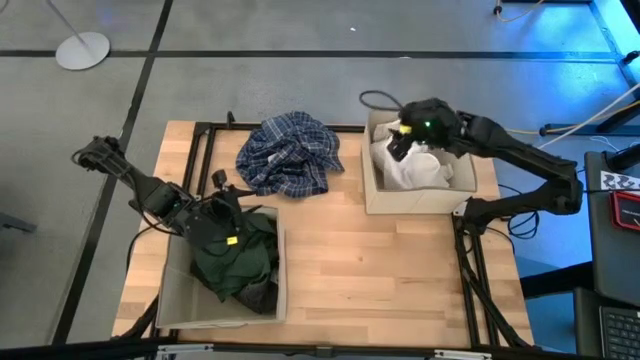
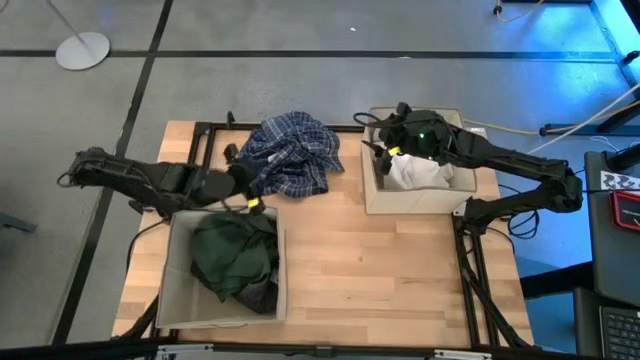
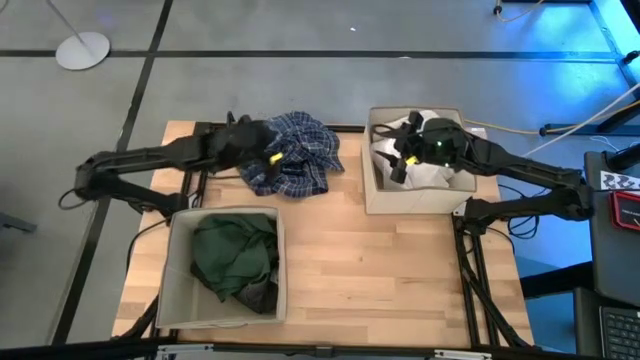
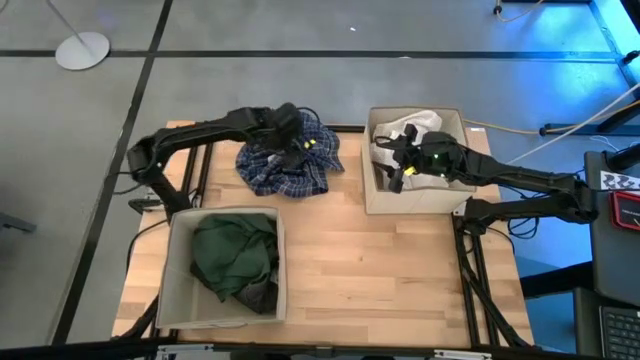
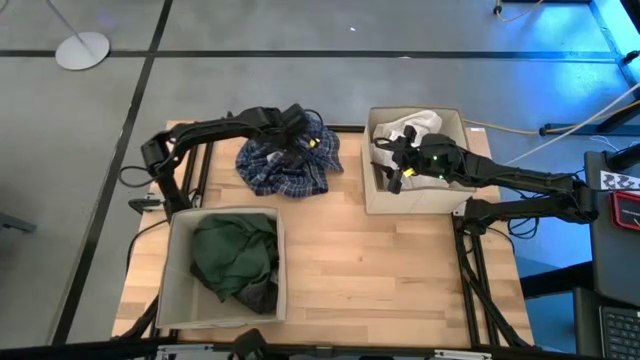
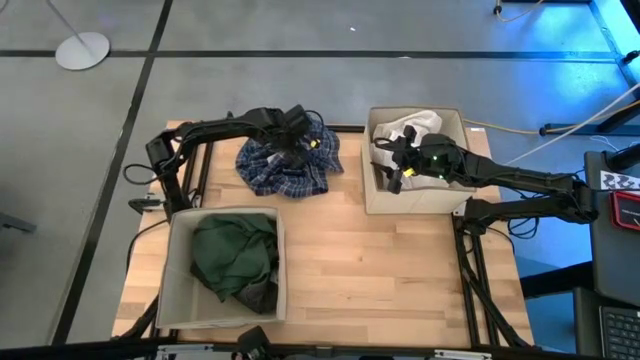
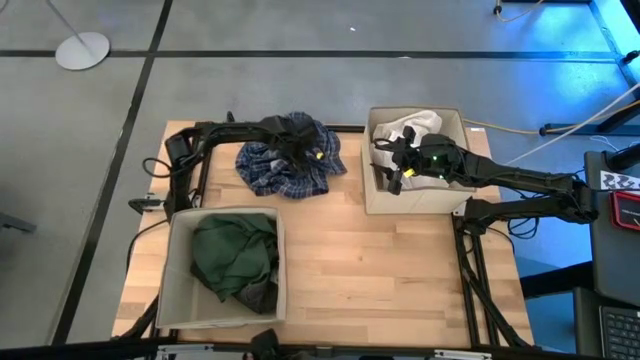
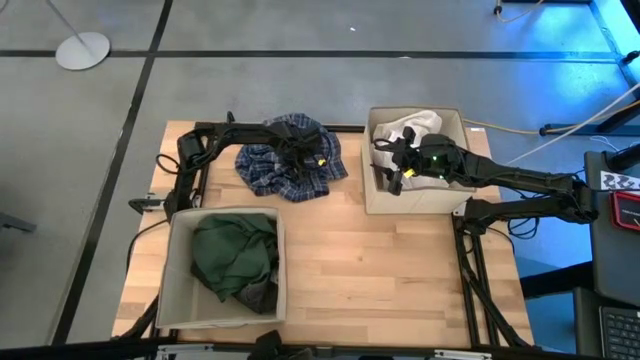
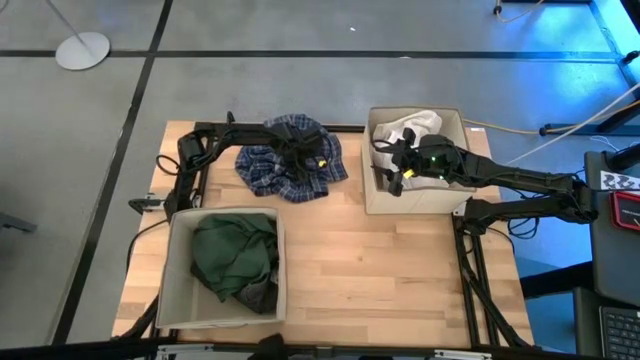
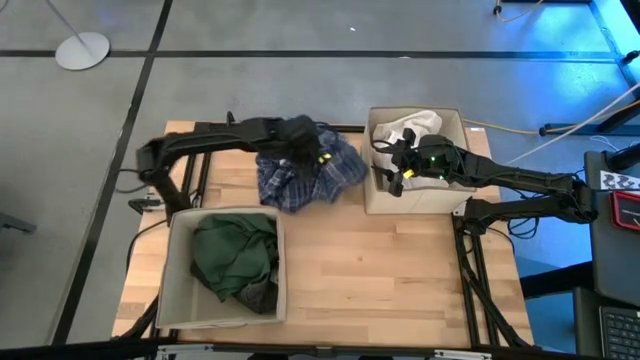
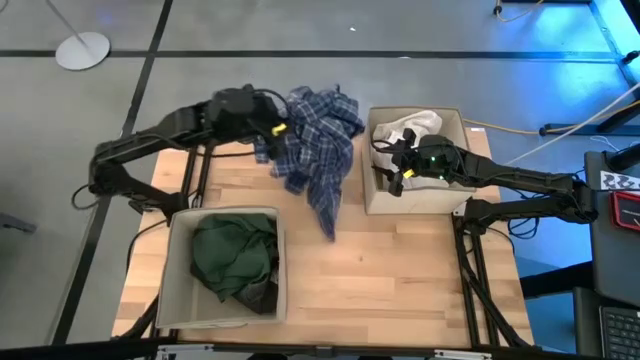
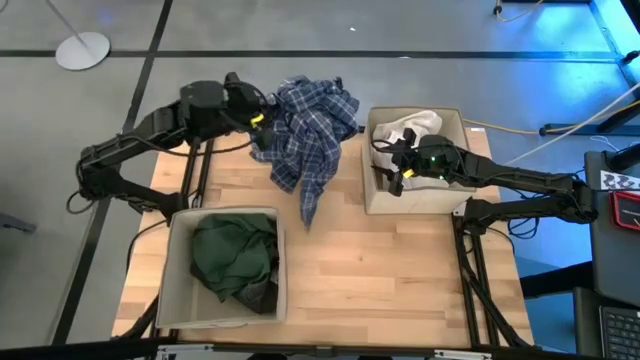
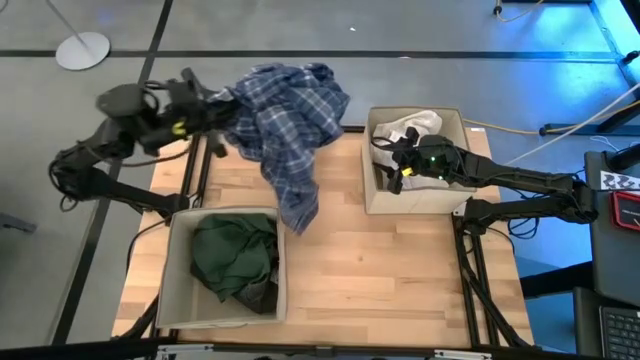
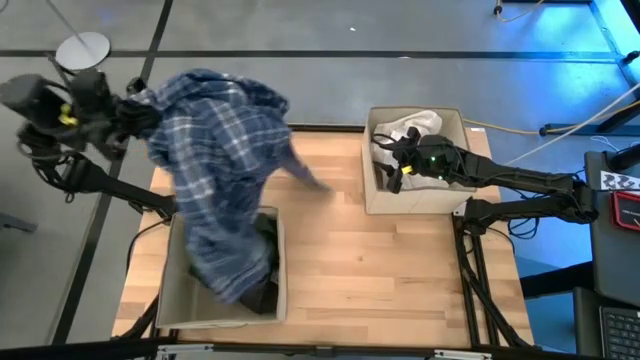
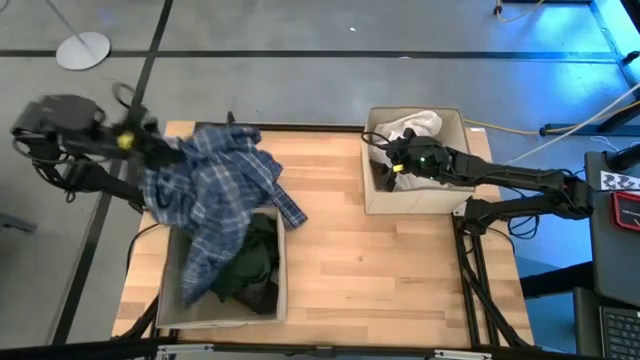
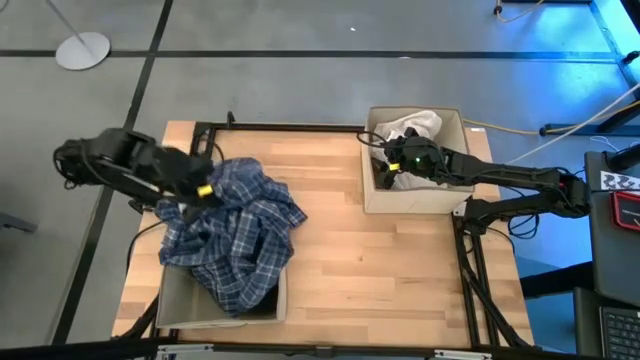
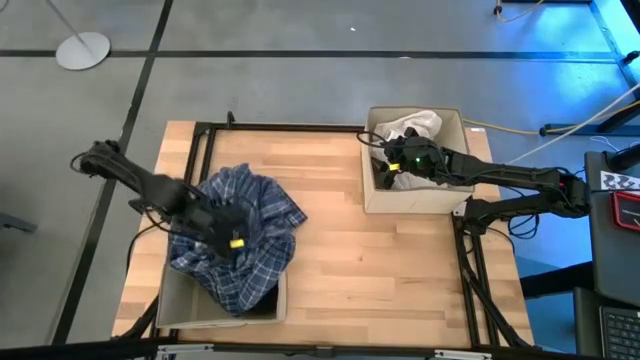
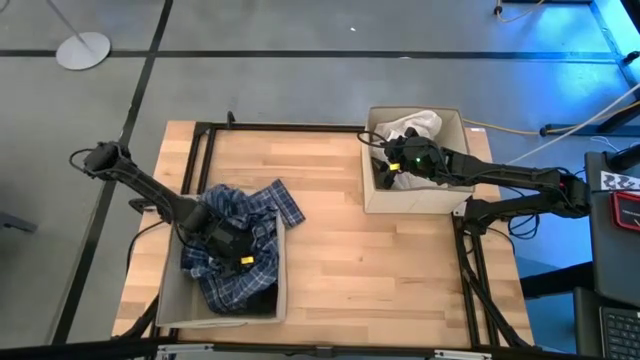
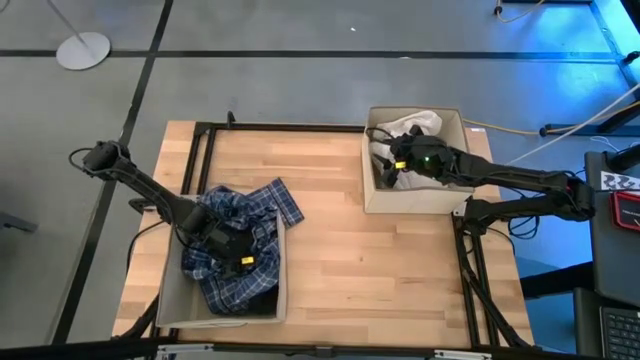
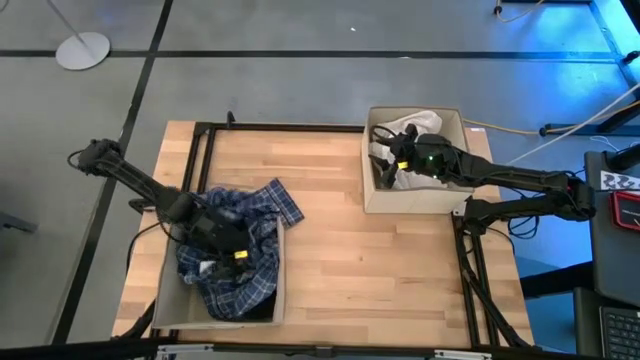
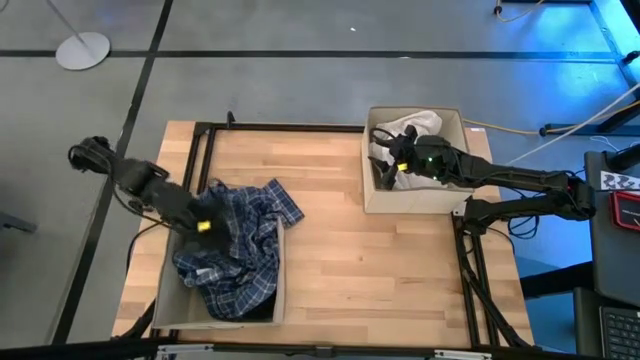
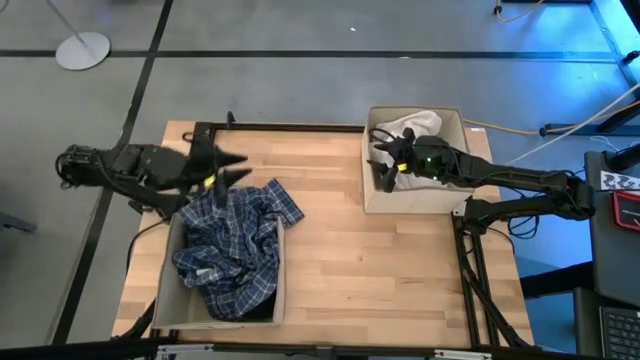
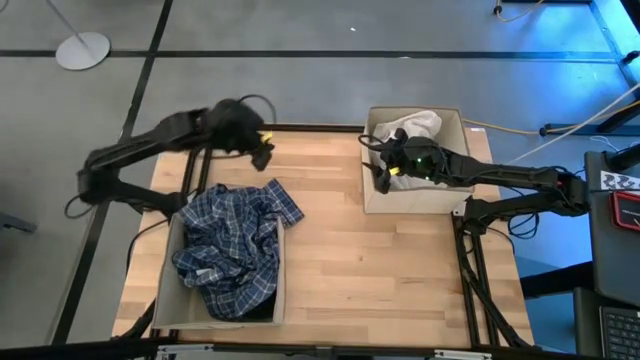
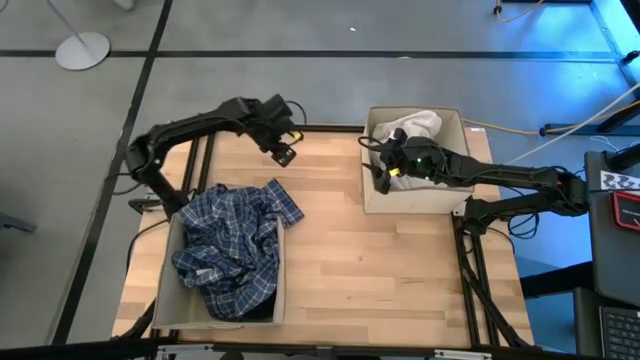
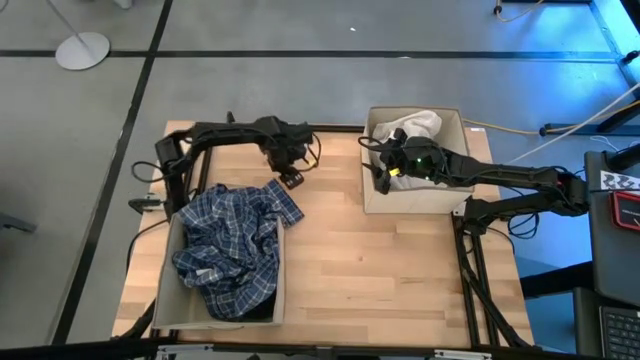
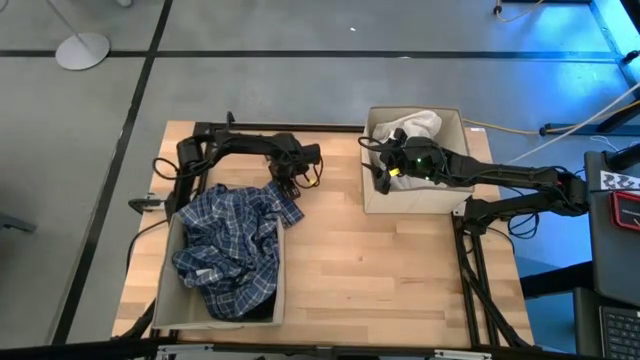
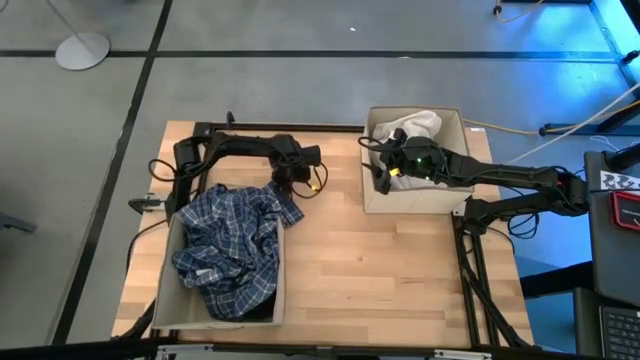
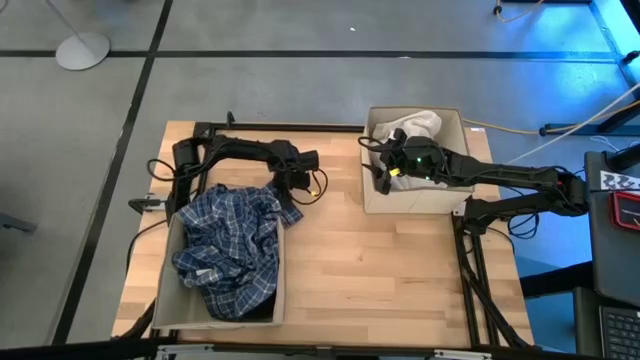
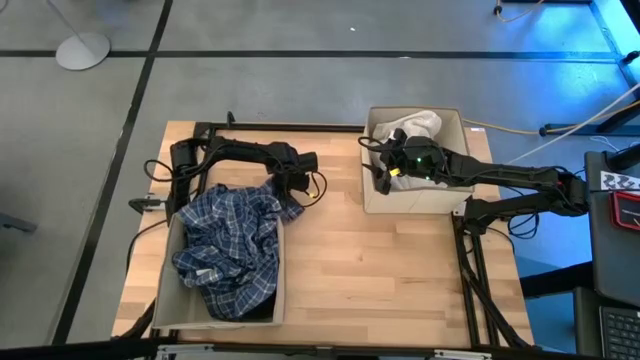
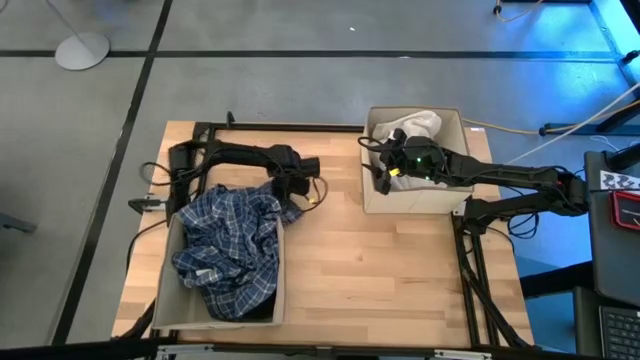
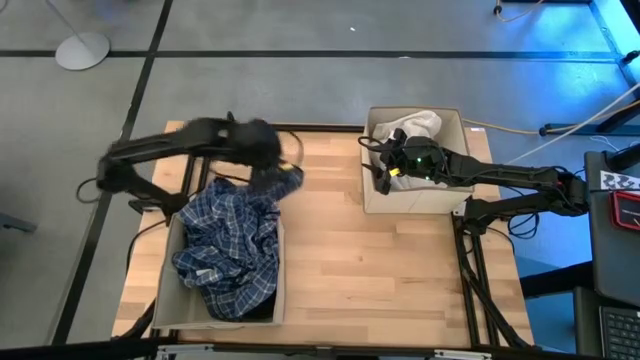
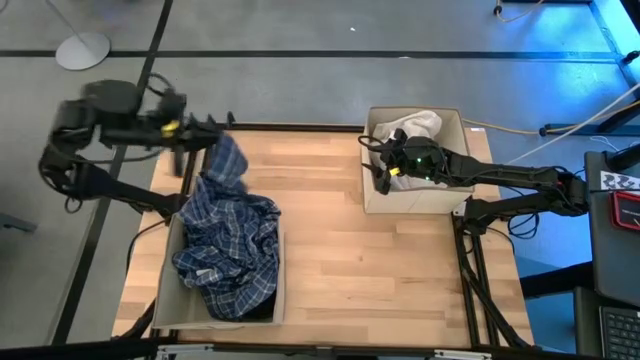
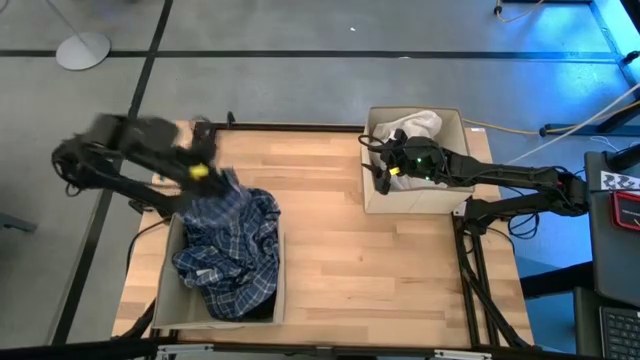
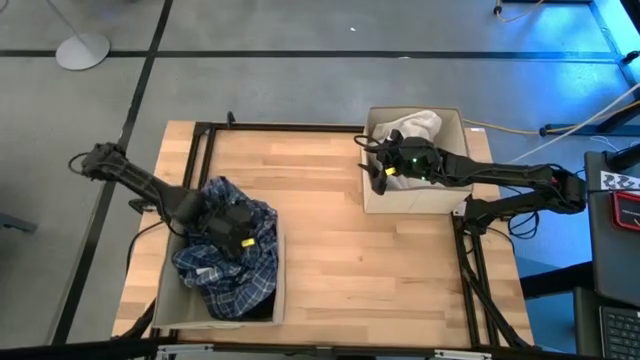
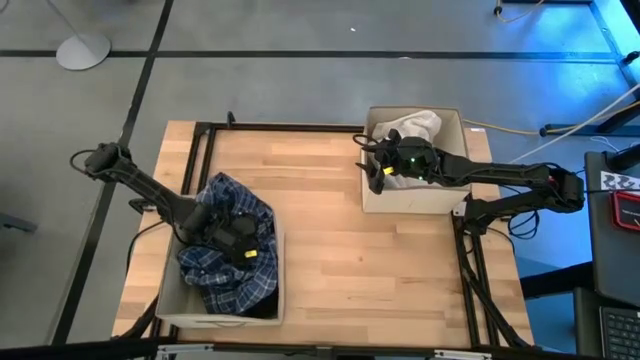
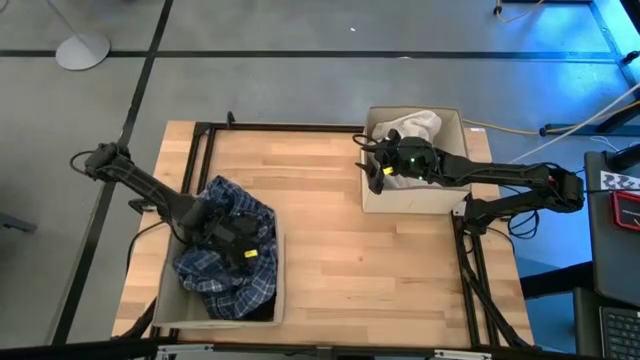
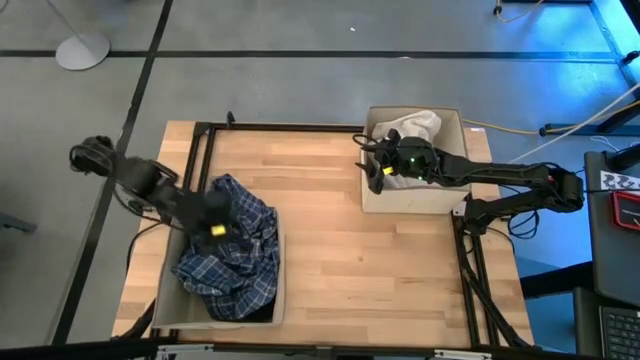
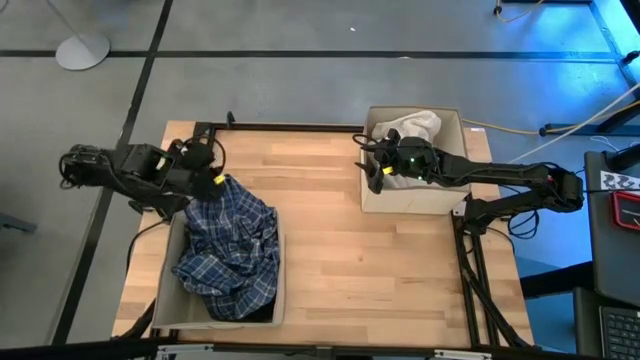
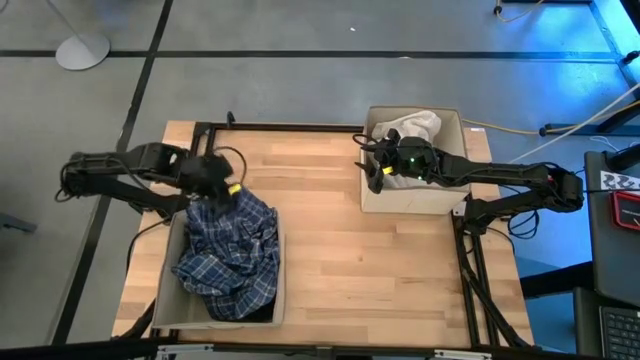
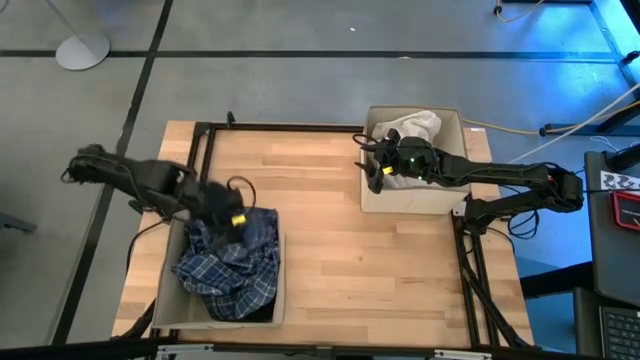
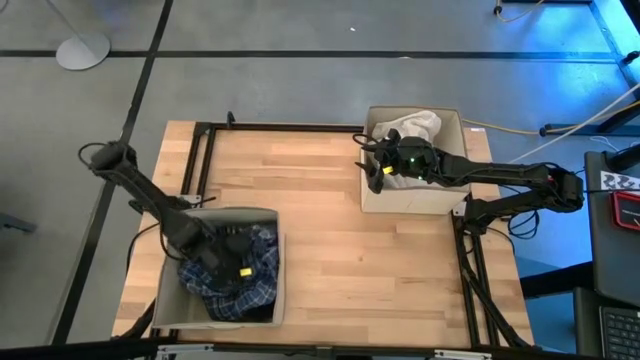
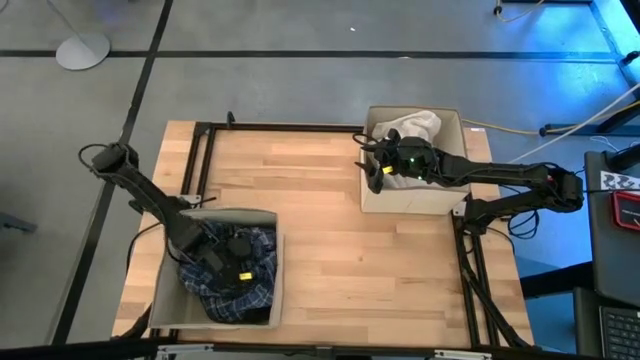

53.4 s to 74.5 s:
Task: Sort clothes
Put the blue polo shirt into the left laundry organizer

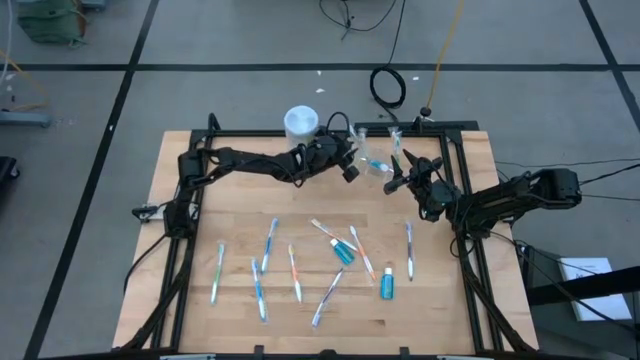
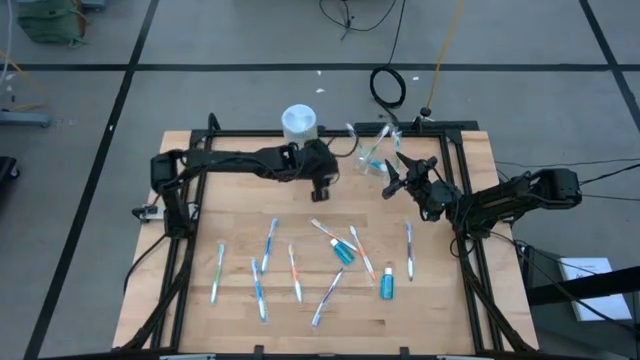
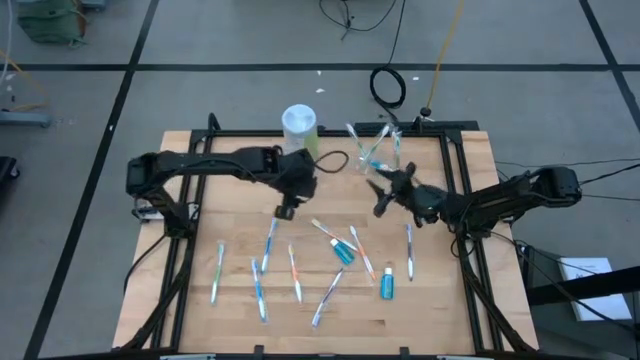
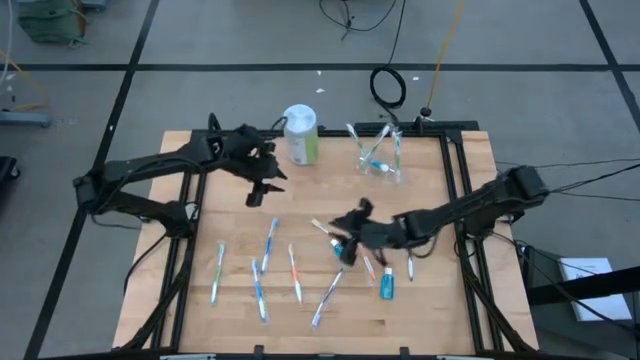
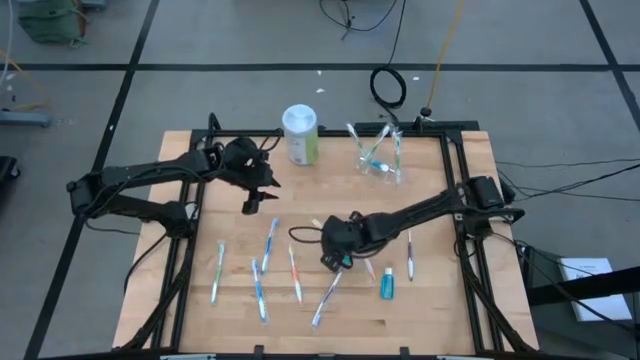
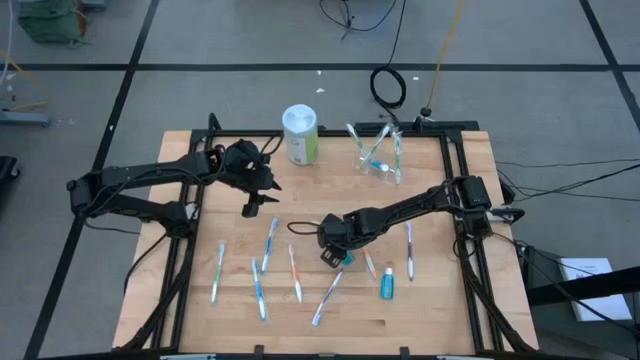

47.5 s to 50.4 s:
Task: Pick & Place toothbrushing station
Put the blue mouthwash into the transparent organizer
